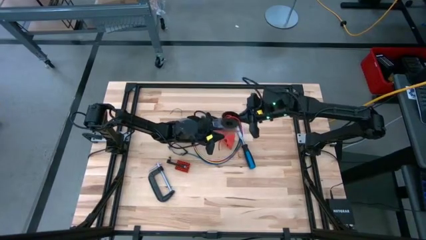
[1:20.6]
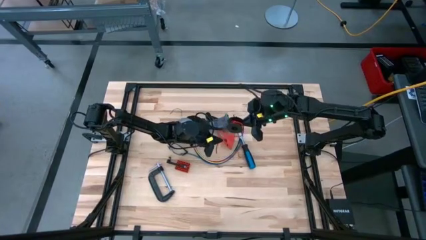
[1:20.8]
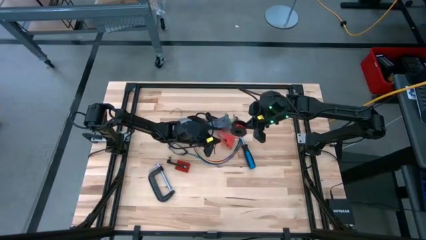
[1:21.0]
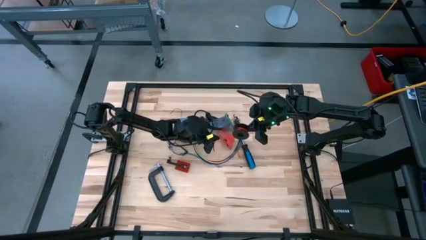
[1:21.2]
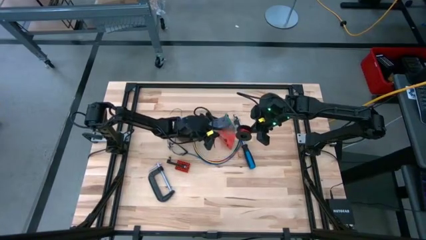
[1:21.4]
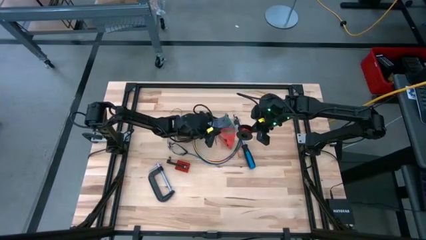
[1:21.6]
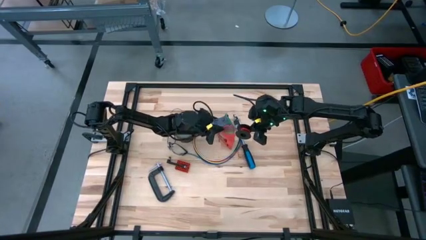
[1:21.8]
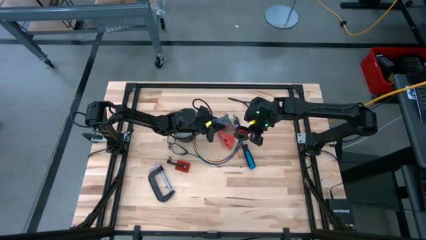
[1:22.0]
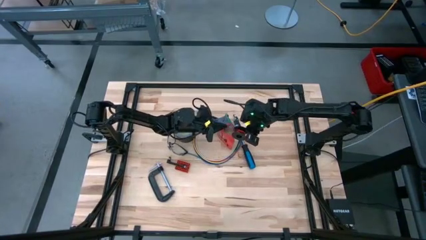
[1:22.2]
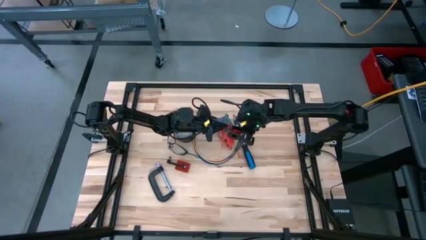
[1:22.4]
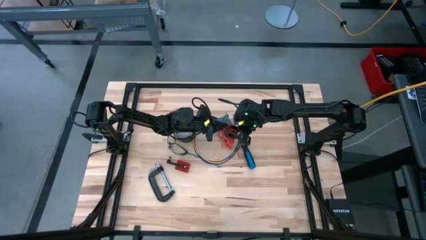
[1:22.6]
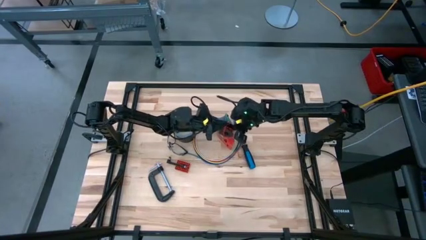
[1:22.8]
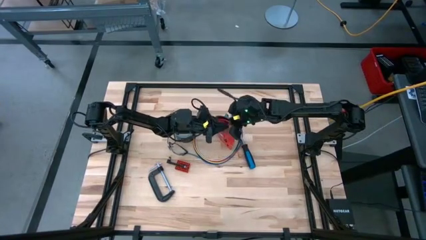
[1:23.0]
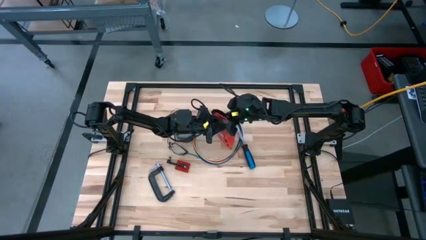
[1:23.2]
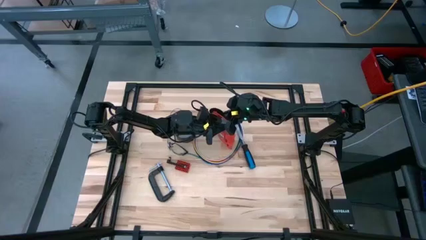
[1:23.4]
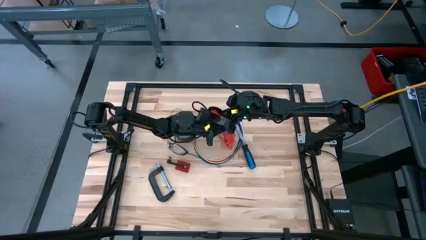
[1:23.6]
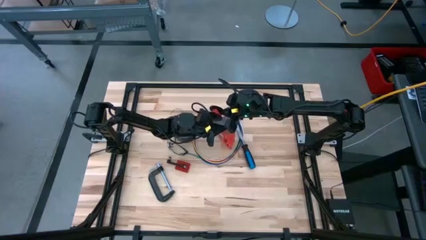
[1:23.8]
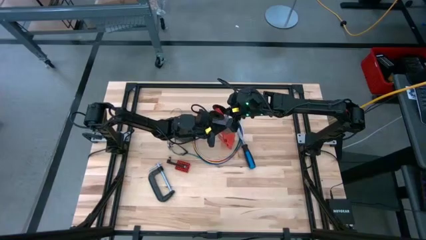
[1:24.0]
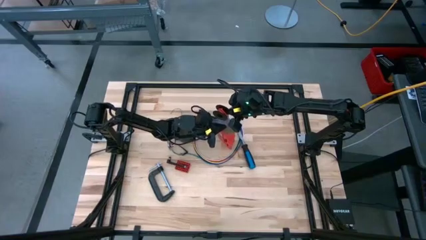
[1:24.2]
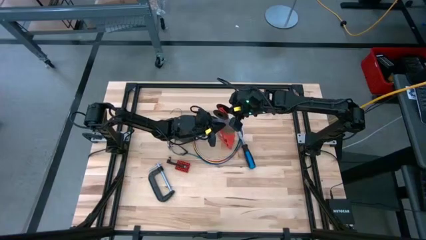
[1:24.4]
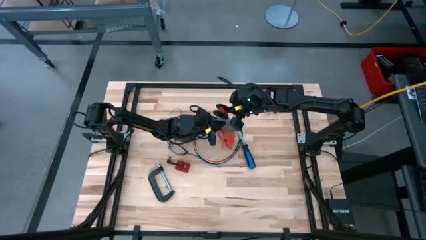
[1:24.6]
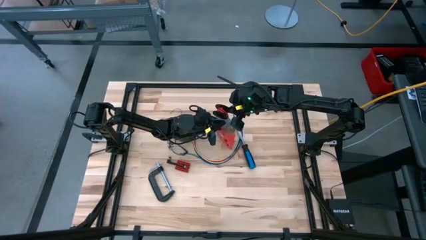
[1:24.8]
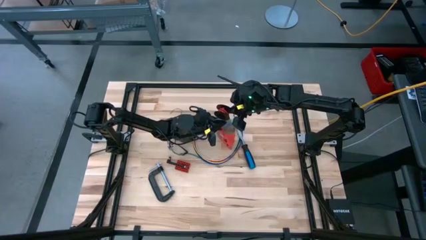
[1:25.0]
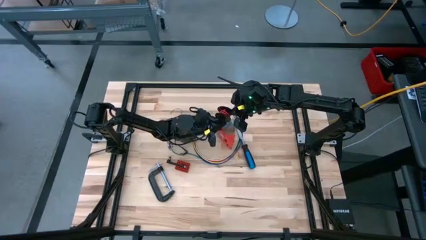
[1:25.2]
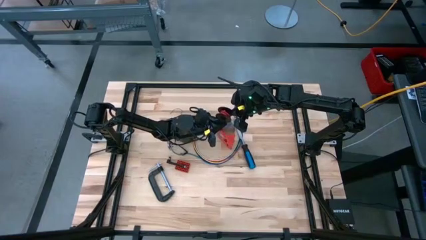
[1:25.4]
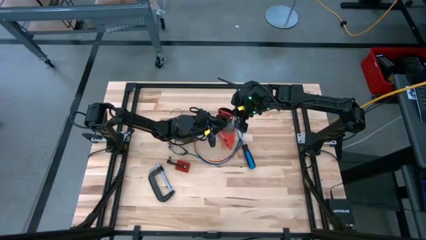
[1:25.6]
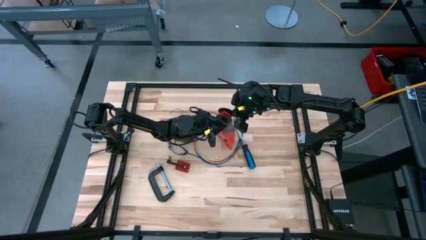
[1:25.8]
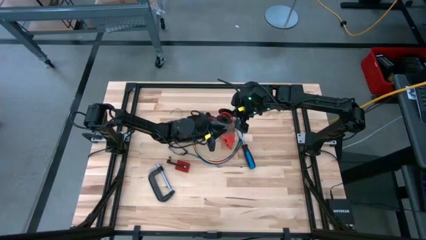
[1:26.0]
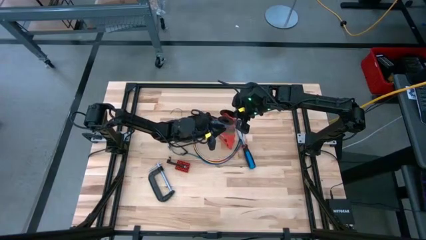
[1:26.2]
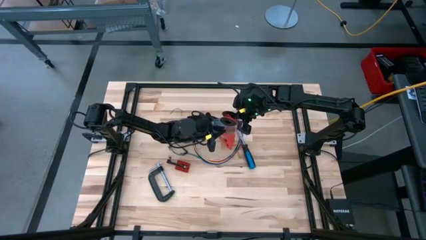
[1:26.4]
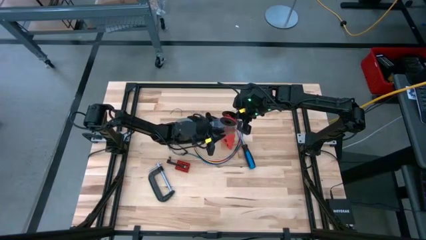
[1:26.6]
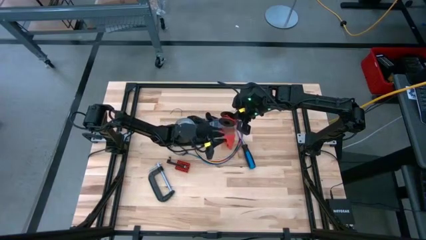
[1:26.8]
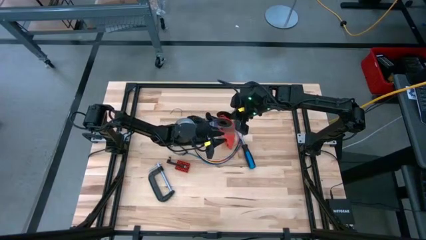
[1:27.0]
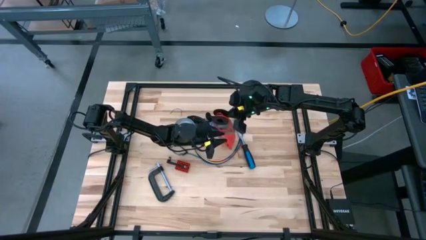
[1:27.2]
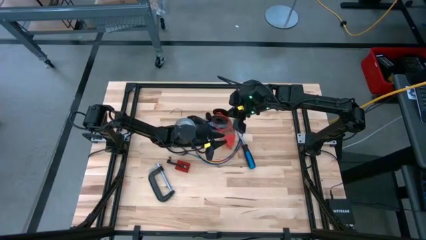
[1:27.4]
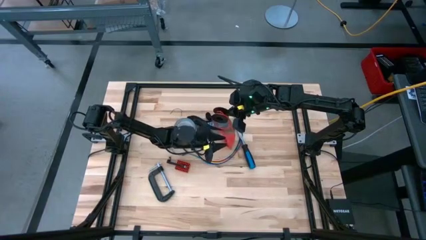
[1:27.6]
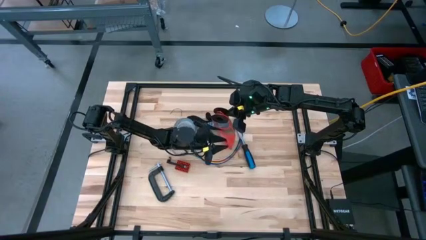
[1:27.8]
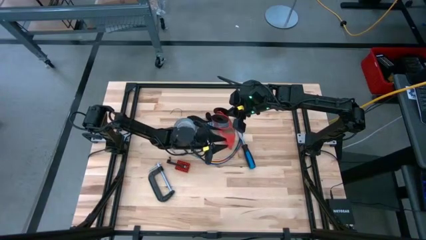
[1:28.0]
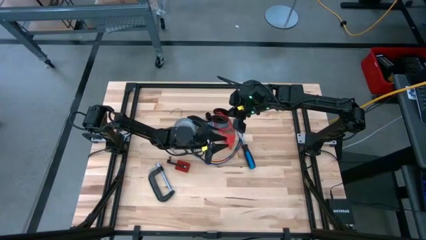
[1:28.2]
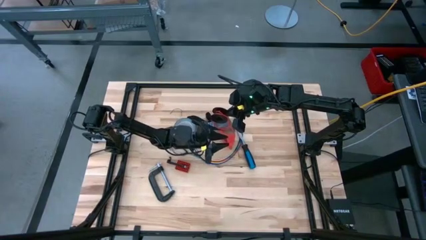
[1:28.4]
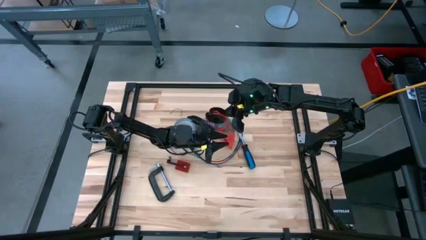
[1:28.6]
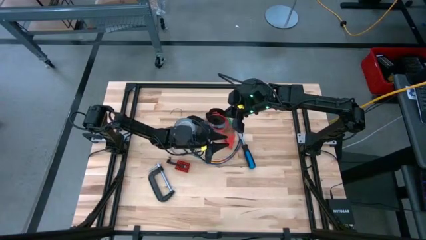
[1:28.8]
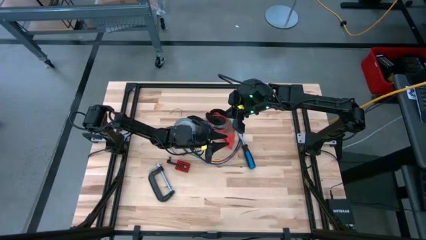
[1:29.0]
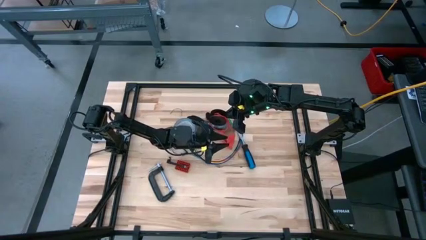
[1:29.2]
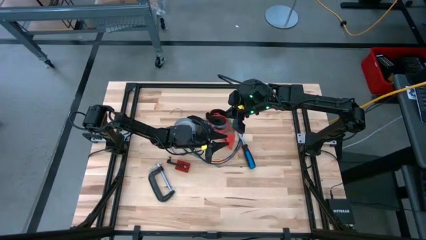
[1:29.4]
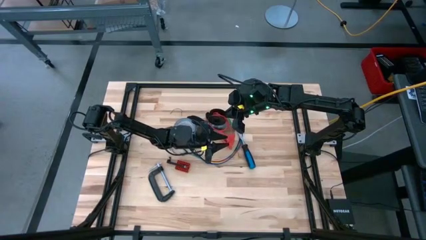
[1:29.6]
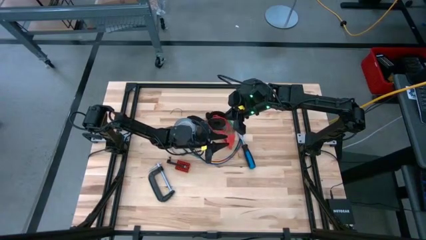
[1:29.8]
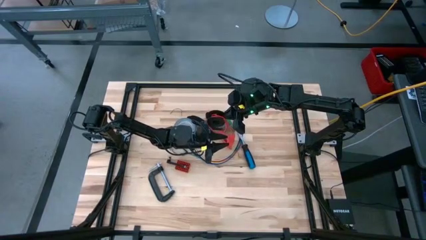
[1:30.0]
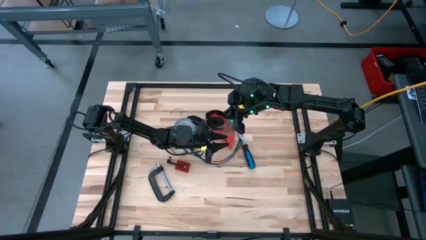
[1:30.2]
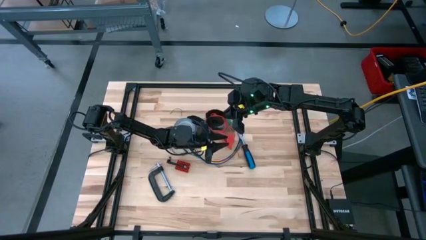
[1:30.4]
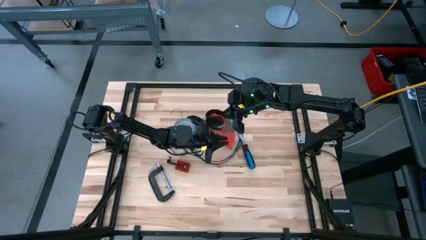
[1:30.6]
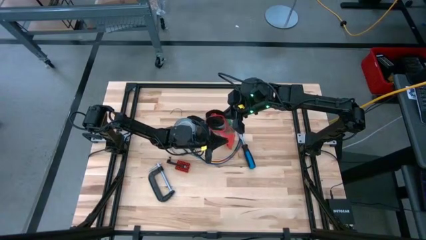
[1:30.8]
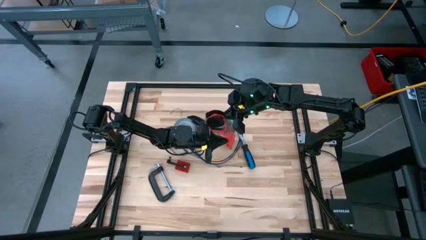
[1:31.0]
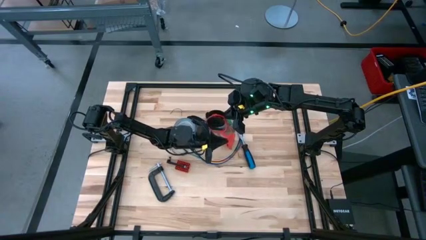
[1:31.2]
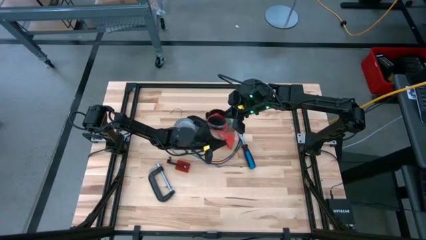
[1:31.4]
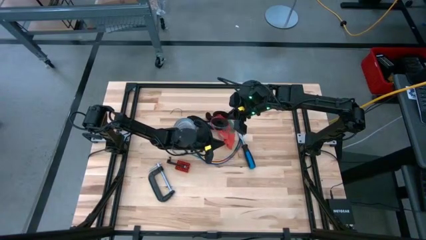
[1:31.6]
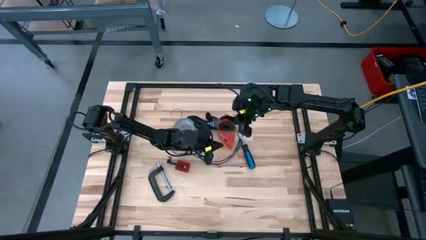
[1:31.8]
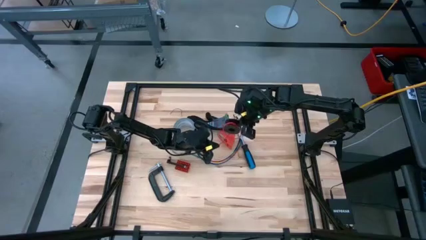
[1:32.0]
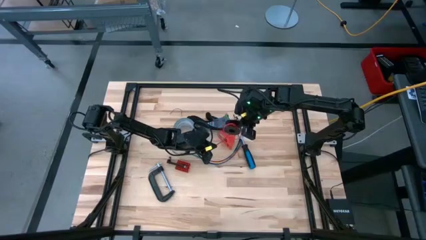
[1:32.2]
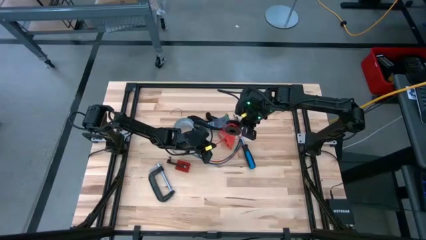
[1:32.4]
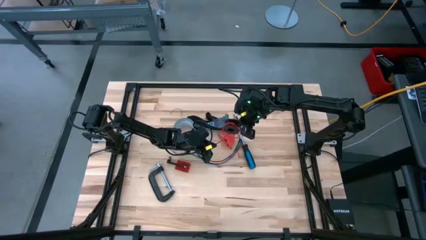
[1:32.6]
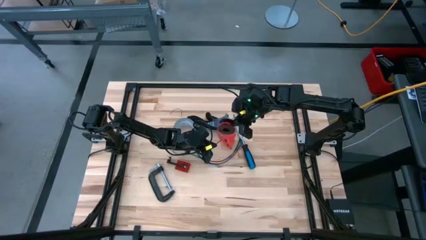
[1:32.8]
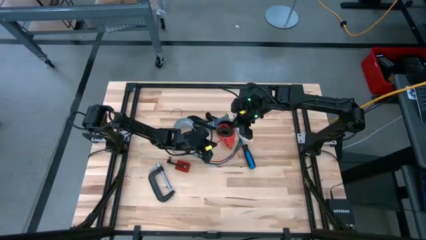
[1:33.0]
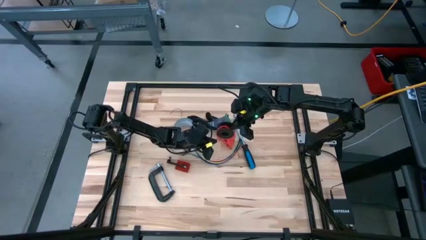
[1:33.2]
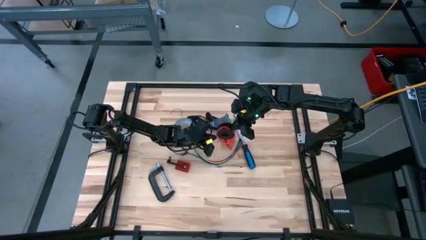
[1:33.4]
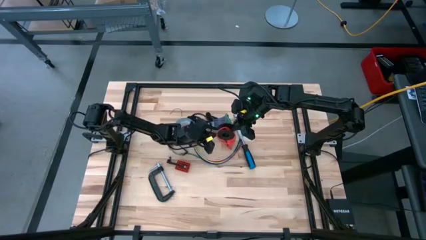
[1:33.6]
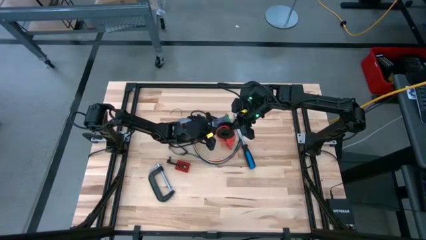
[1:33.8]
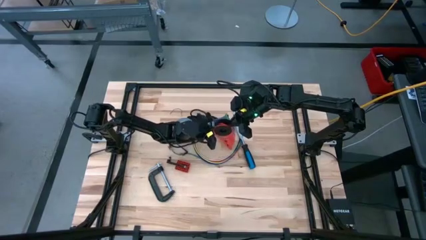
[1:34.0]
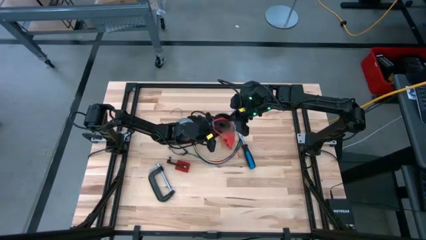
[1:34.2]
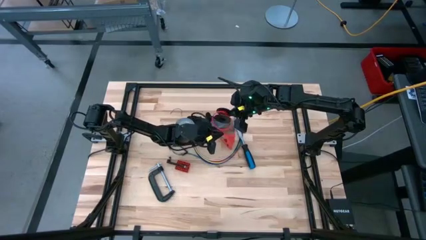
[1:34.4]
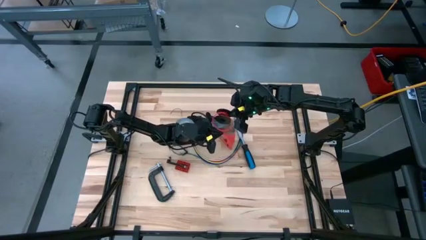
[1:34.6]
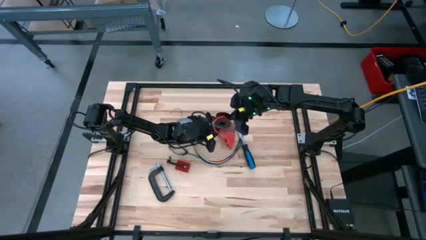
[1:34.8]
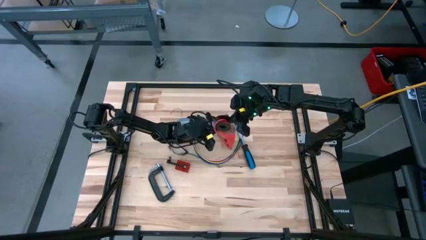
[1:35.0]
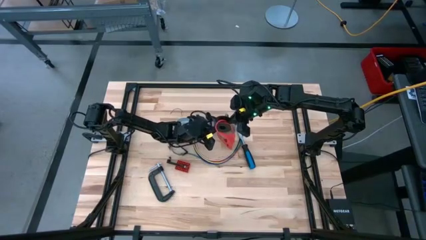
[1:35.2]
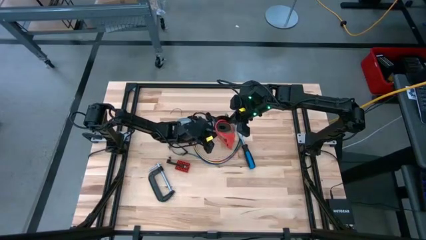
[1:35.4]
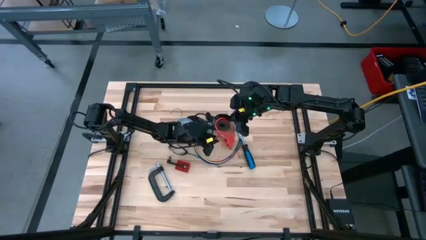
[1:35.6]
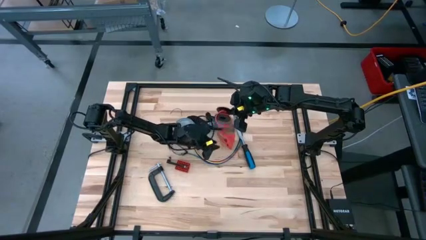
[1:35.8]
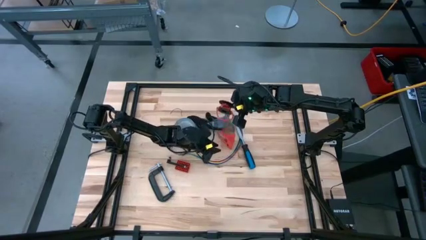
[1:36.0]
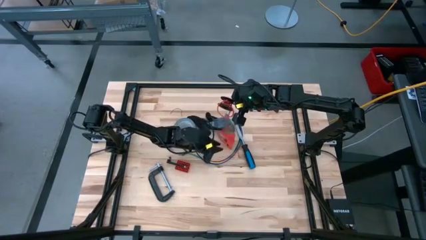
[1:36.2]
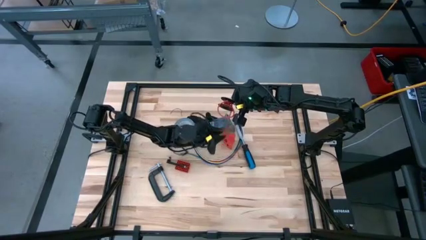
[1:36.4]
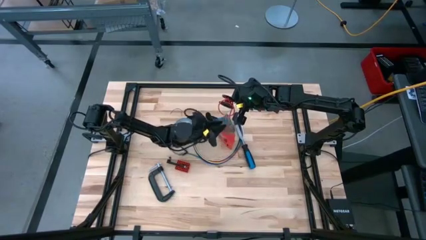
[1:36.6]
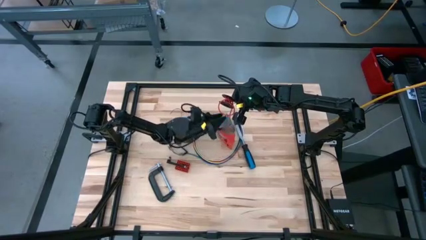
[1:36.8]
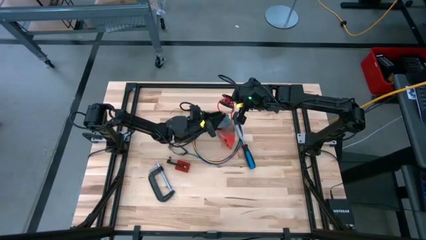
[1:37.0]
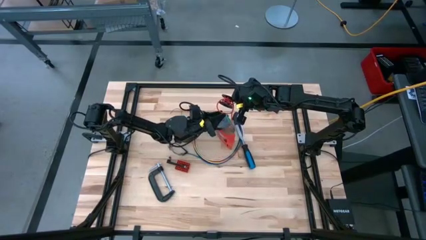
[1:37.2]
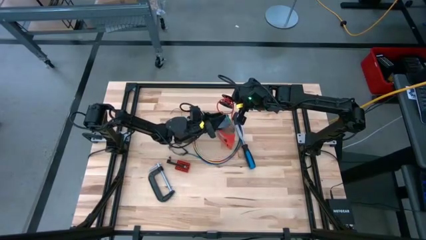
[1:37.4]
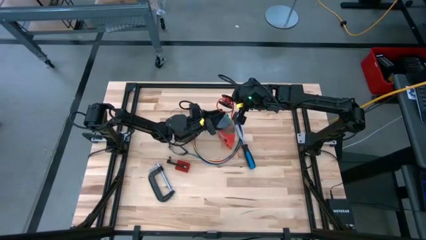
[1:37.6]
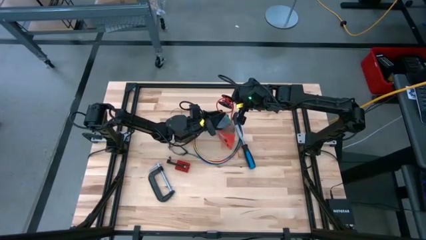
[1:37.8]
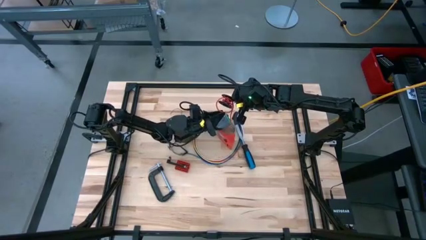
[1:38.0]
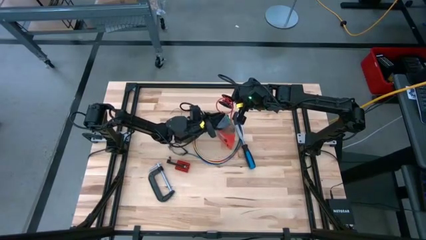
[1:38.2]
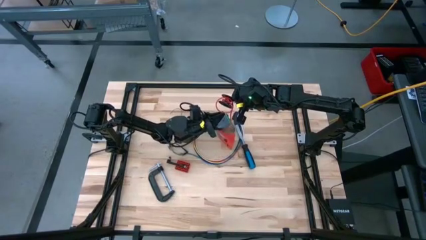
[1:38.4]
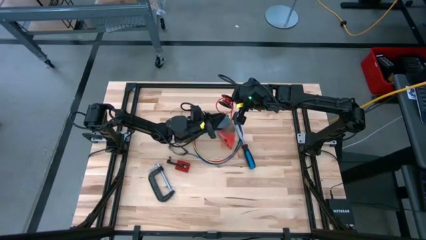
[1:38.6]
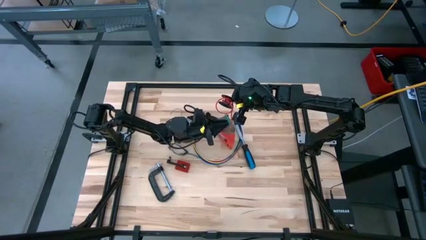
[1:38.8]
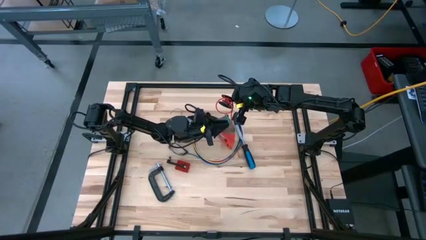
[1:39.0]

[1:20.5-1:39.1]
Task: Coil cords
Coil the red wire cable onto the black spool
